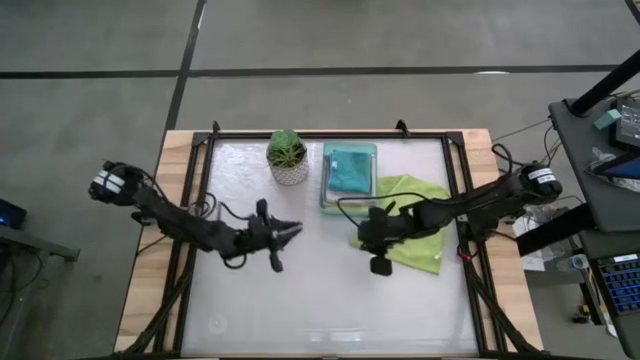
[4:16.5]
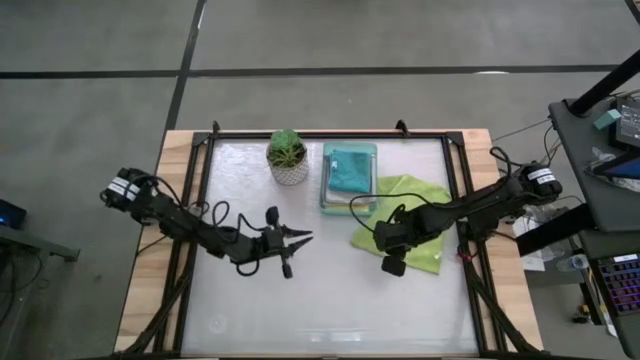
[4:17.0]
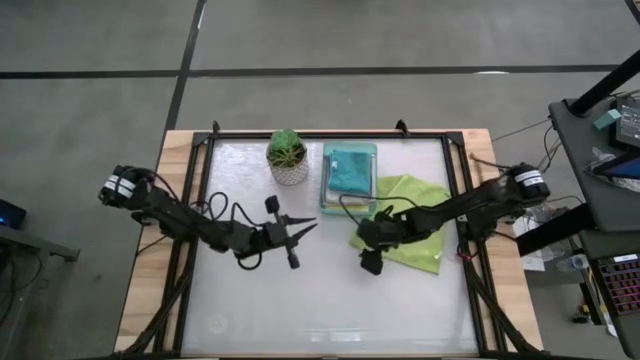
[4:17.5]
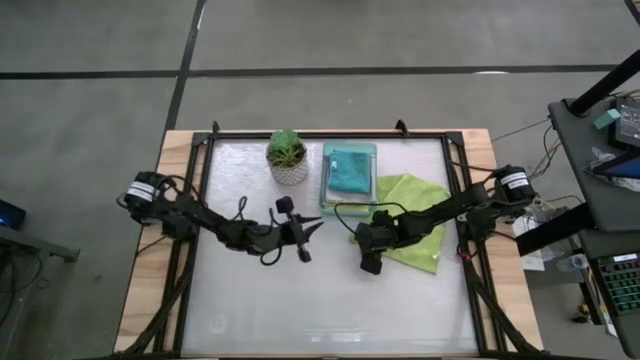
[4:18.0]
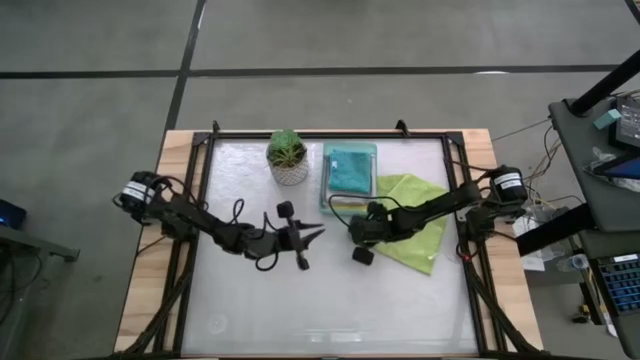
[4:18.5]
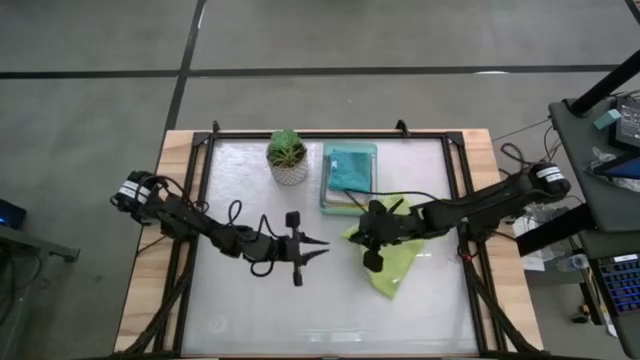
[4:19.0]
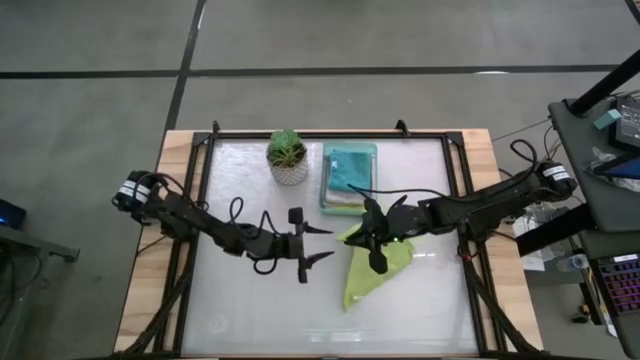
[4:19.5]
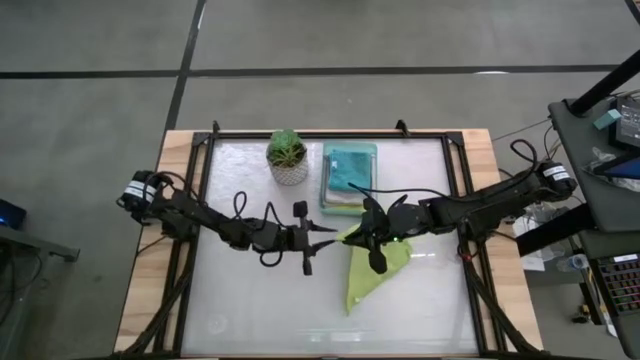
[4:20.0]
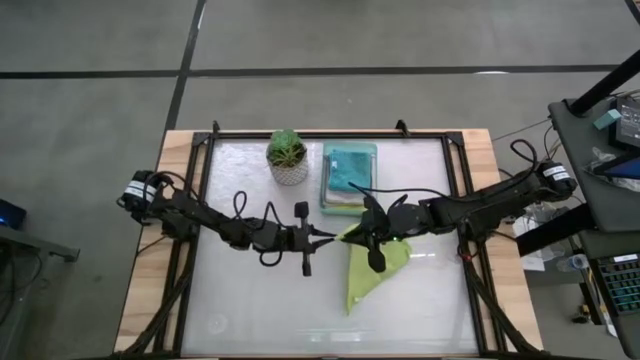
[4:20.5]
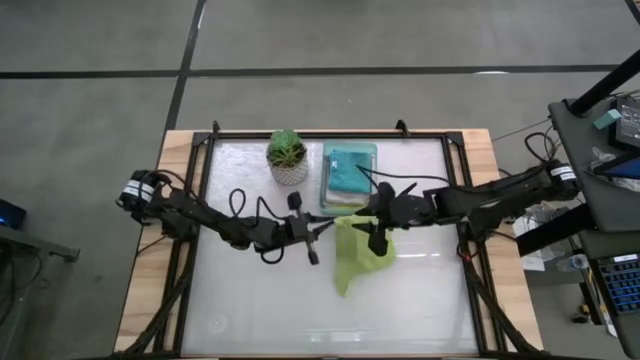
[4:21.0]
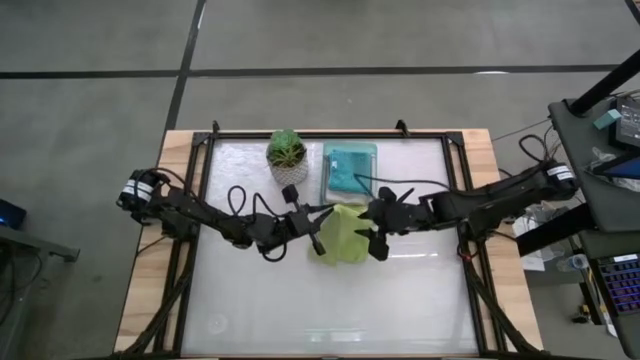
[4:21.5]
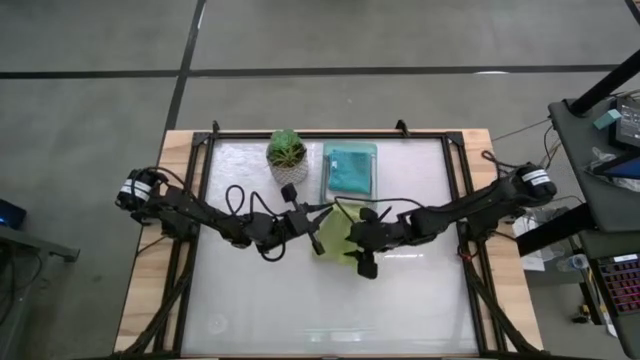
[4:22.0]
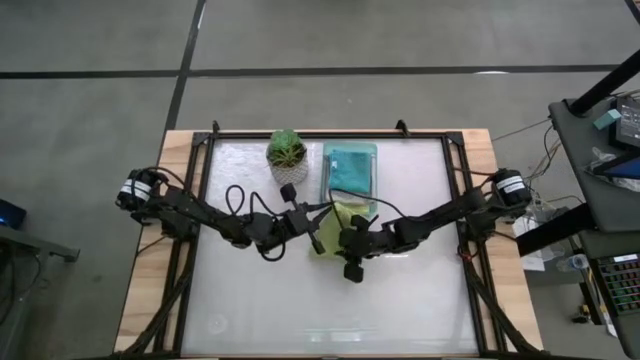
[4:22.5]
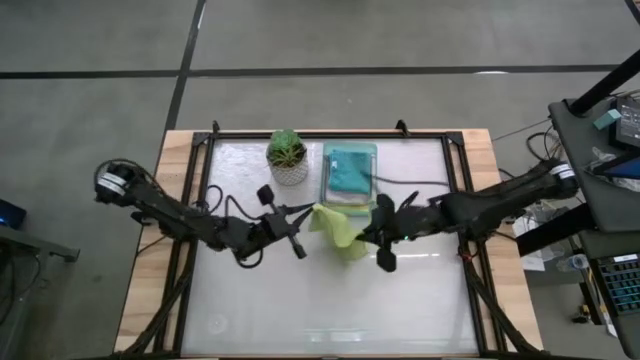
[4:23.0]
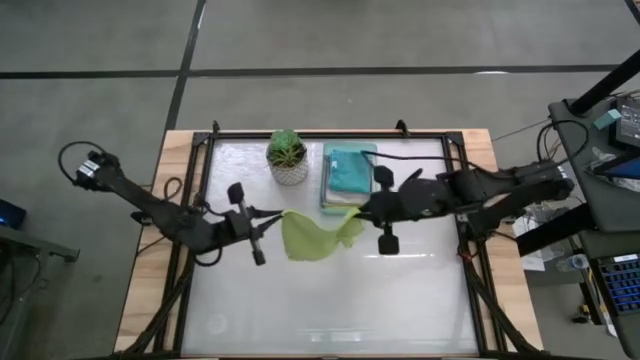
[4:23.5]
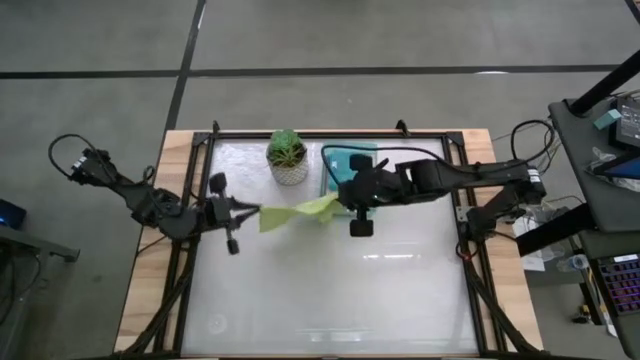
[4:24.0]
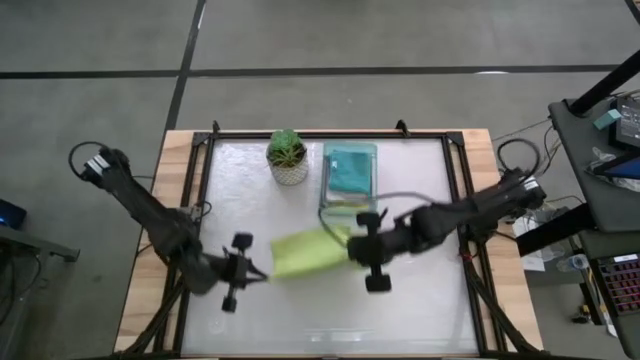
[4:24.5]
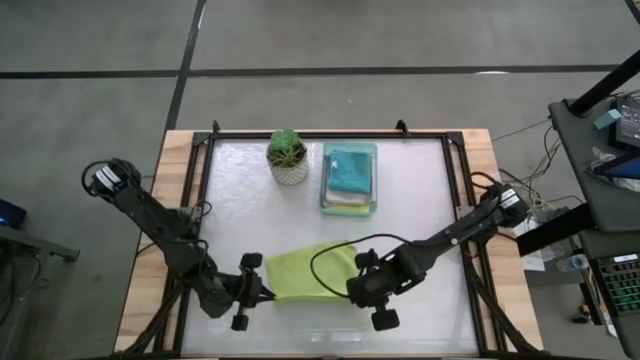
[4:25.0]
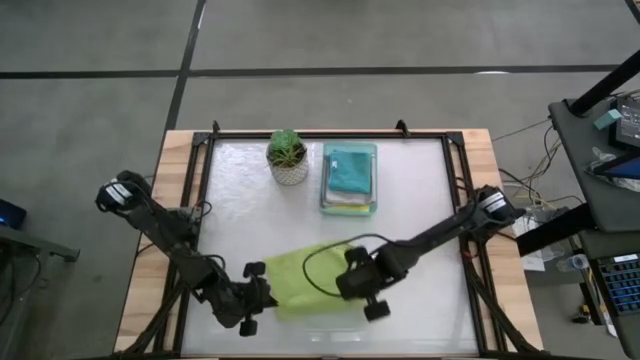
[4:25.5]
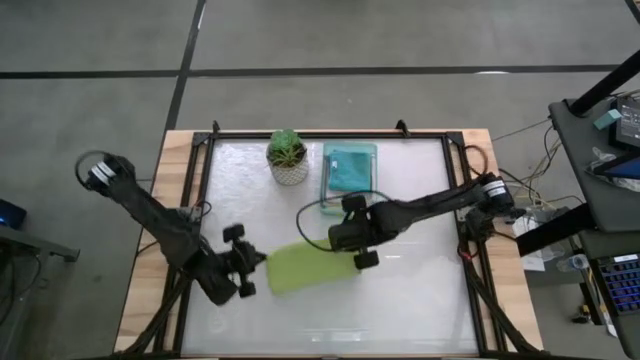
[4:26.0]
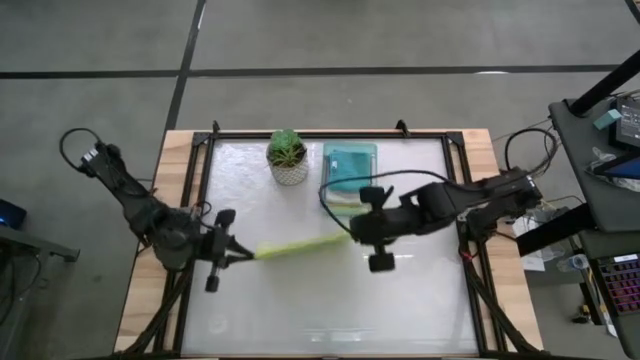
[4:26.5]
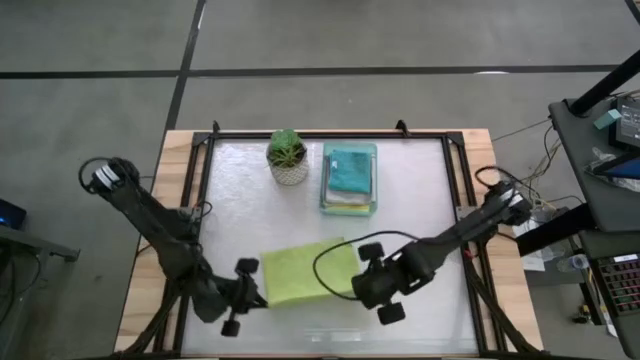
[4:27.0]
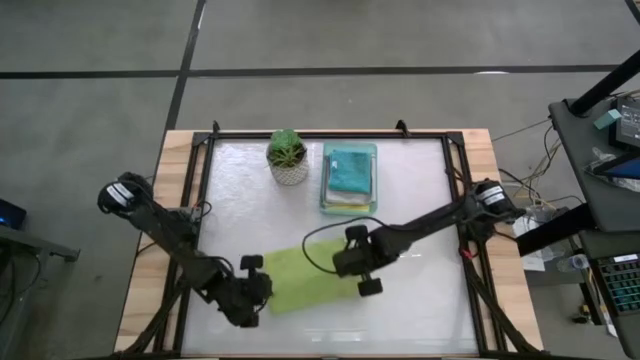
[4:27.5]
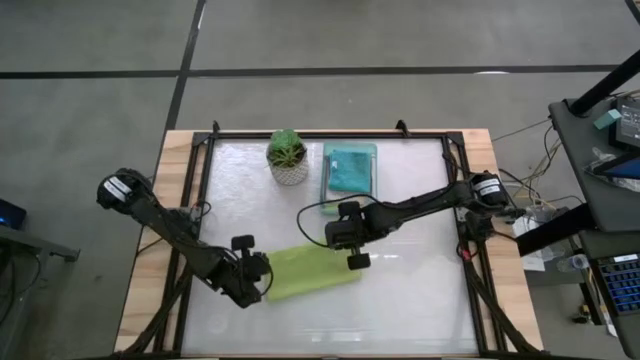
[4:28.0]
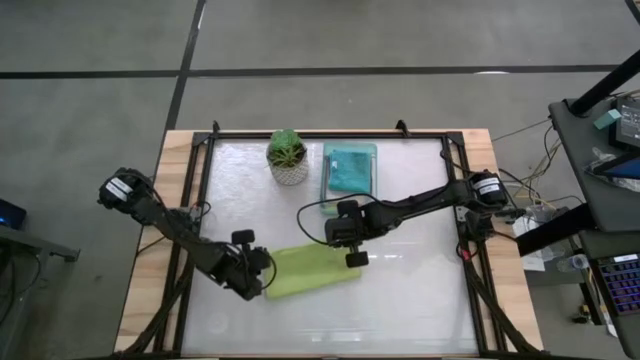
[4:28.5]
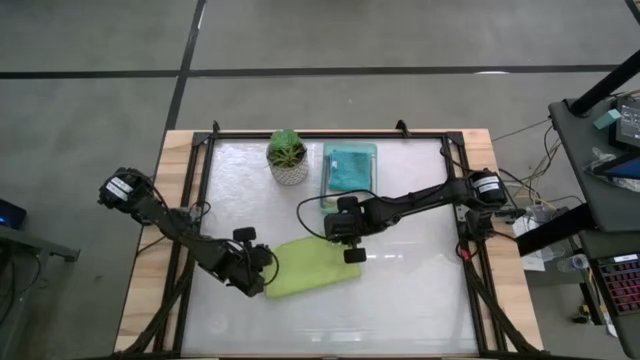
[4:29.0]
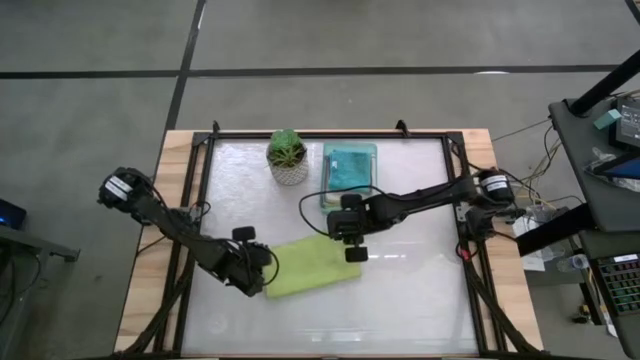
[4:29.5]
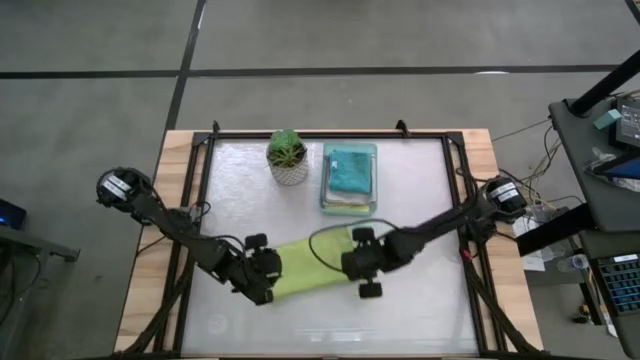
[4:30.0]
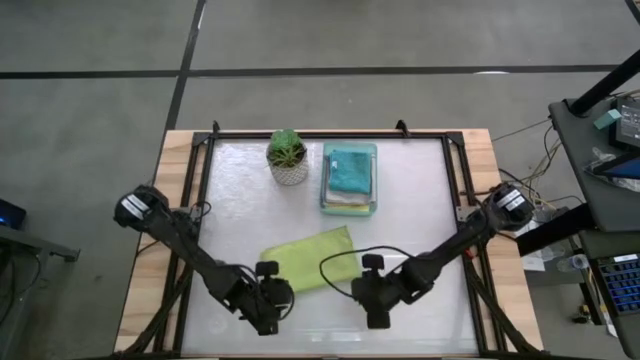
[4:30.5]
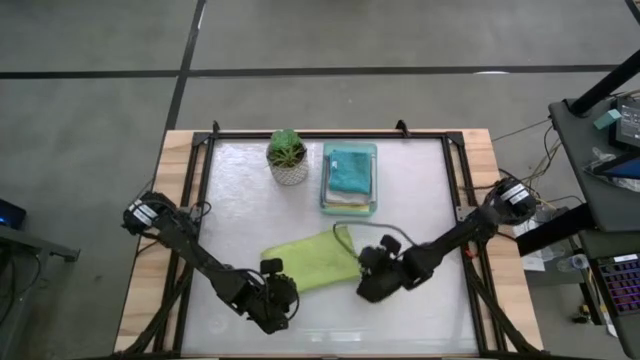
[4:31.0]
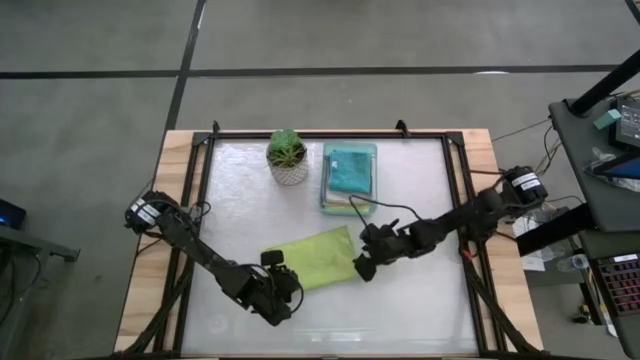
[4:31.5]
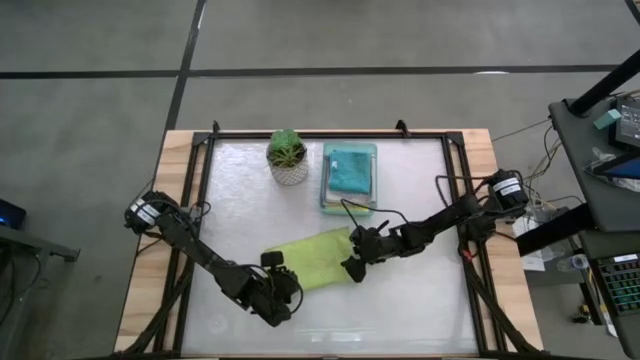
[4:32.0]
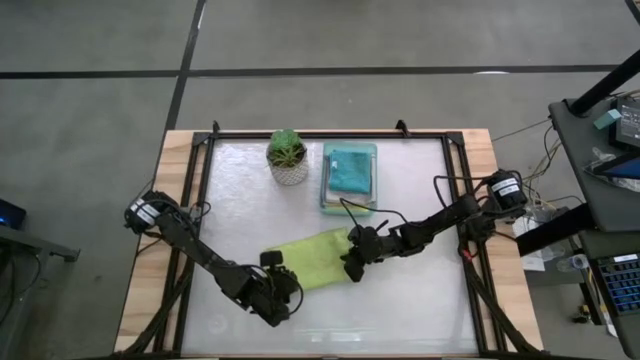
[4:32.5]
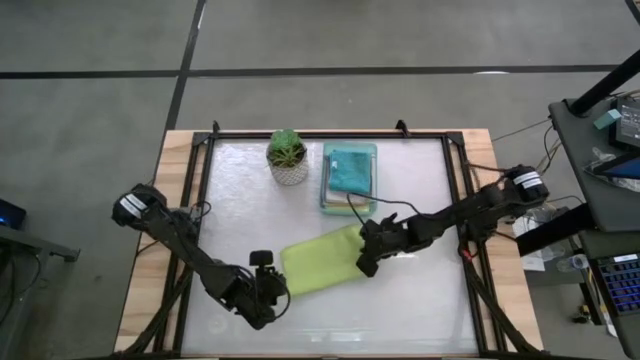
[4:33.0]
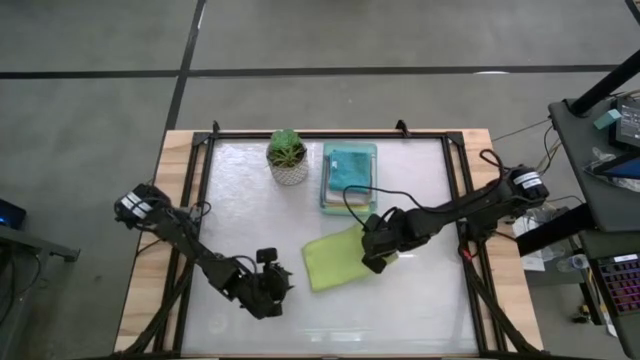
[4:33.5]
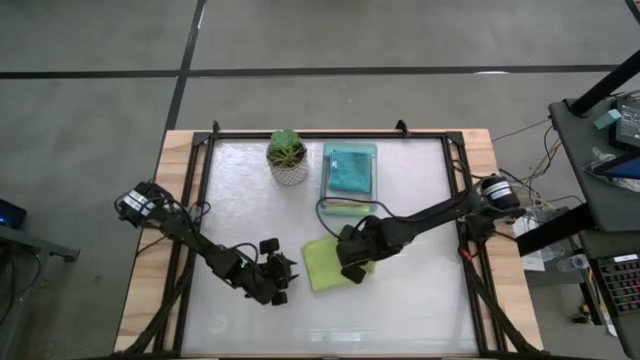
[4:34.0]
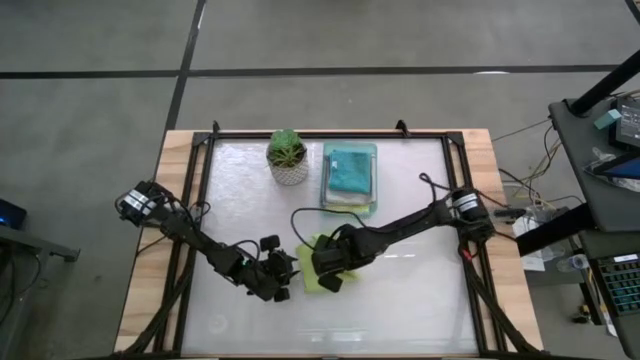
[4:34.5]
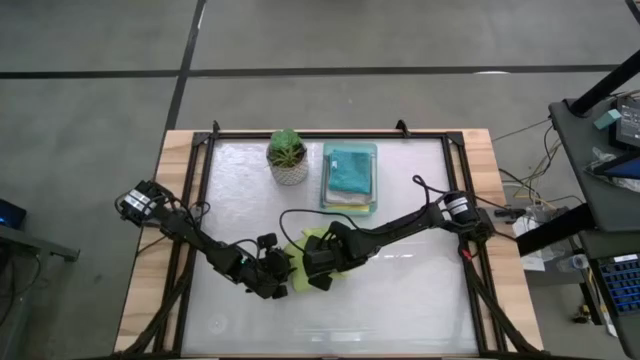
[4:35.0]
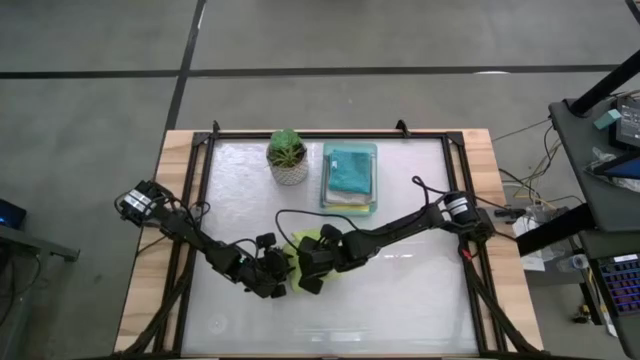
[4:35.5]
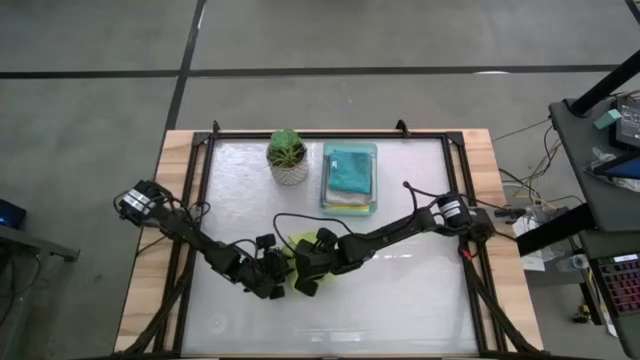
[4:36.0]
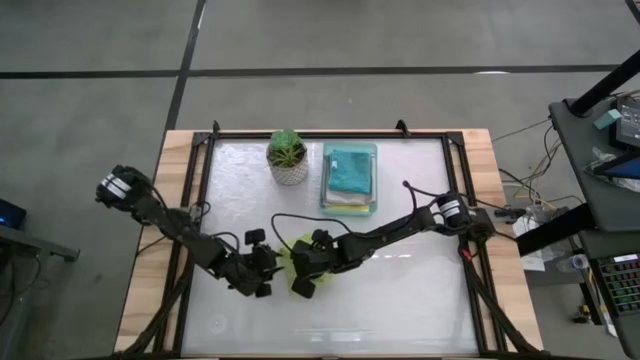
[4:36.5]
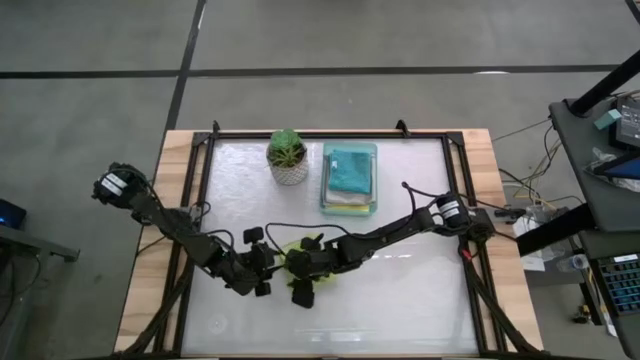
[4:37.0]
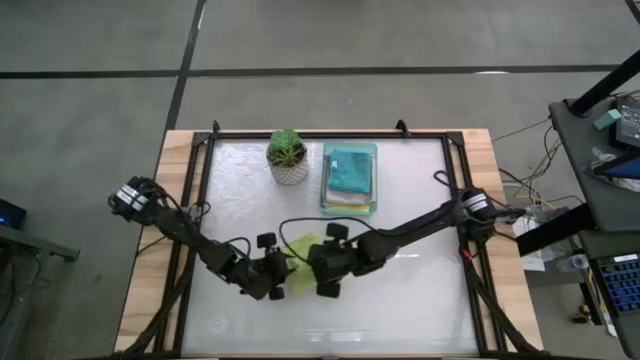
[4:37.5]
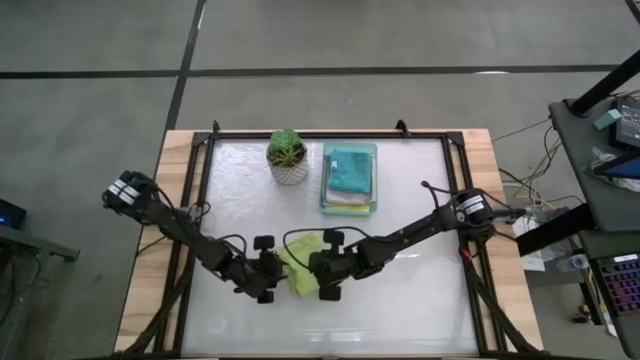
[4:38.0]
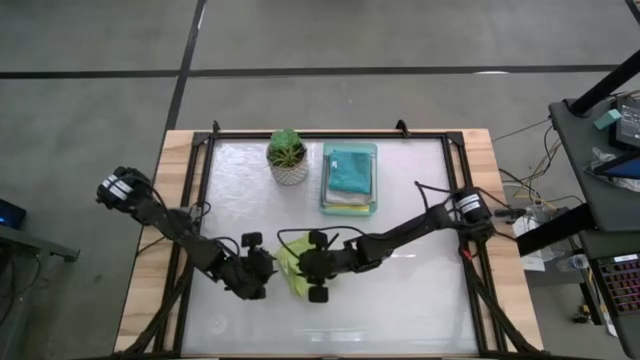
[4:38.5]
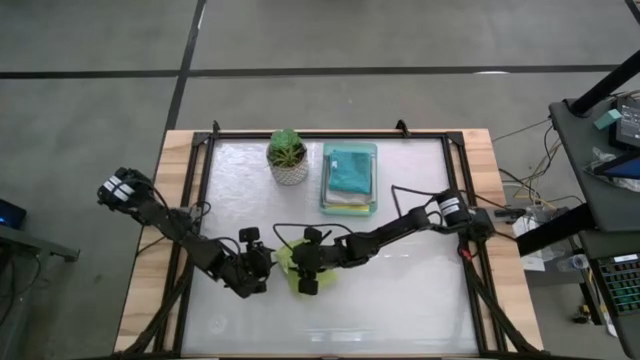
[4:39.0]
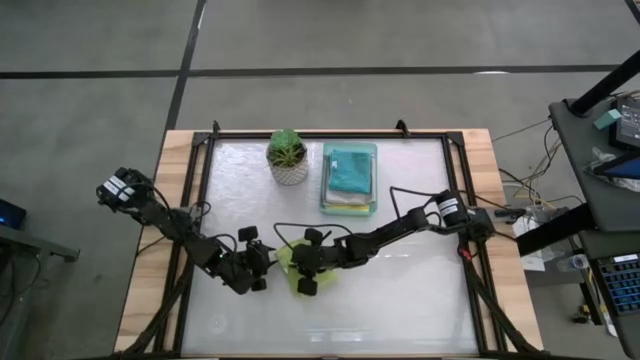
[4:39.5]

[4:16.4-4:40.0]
Task: Fold microfiber towels
Fold the green microfiber cloth
